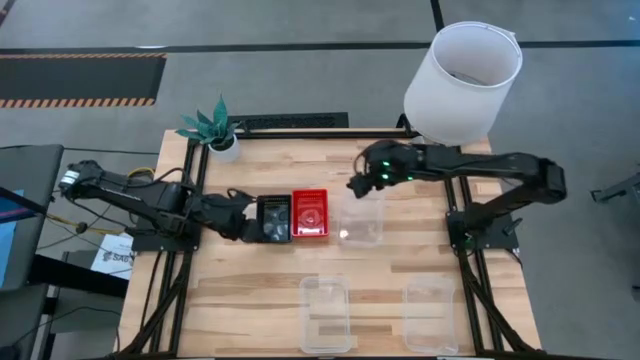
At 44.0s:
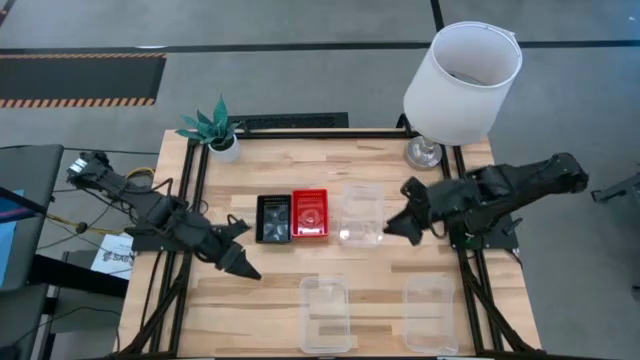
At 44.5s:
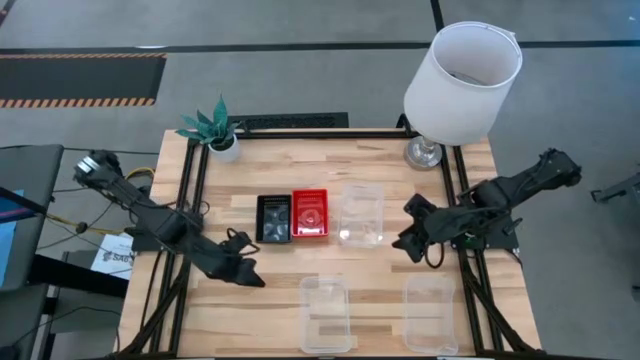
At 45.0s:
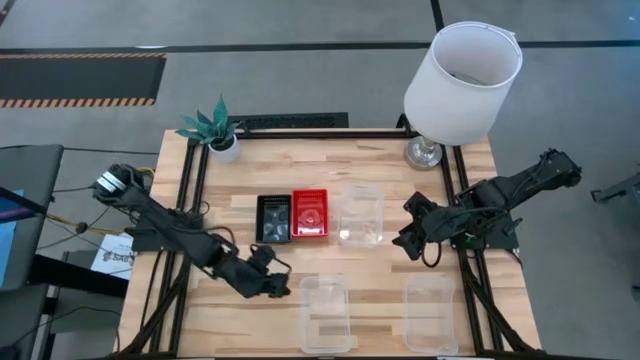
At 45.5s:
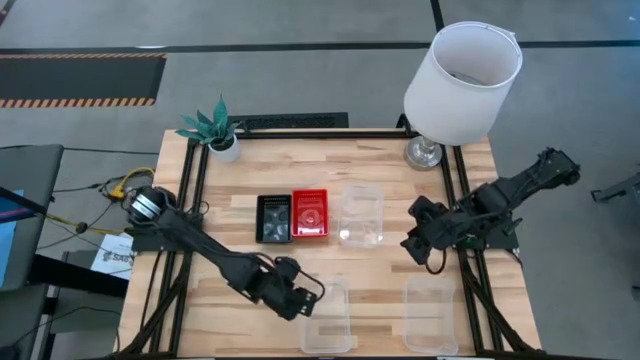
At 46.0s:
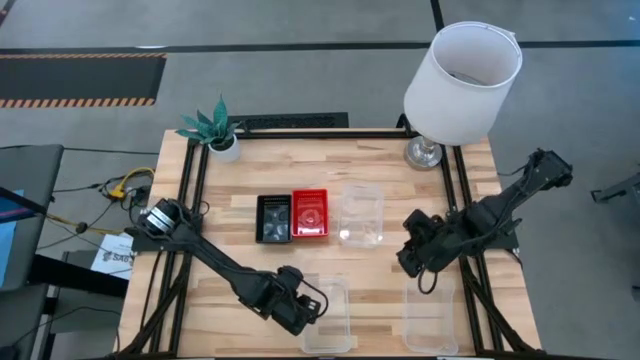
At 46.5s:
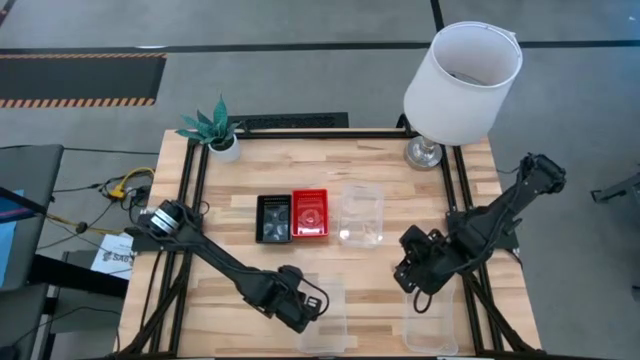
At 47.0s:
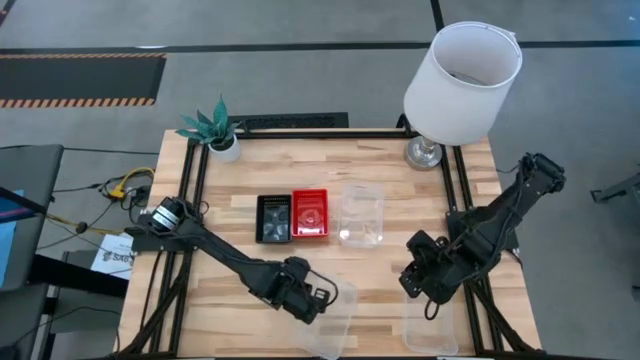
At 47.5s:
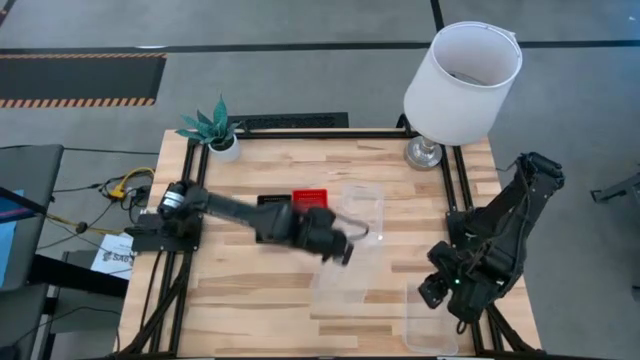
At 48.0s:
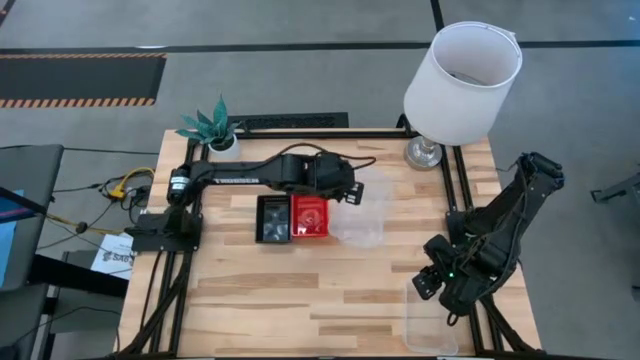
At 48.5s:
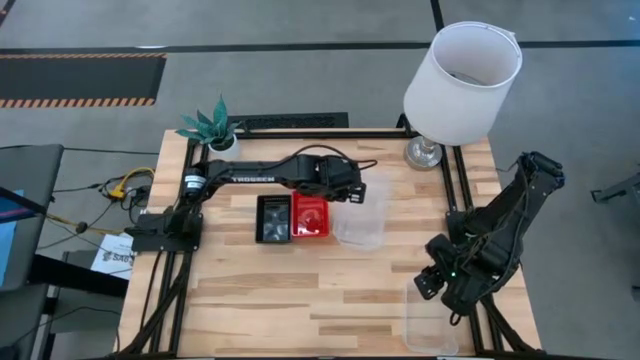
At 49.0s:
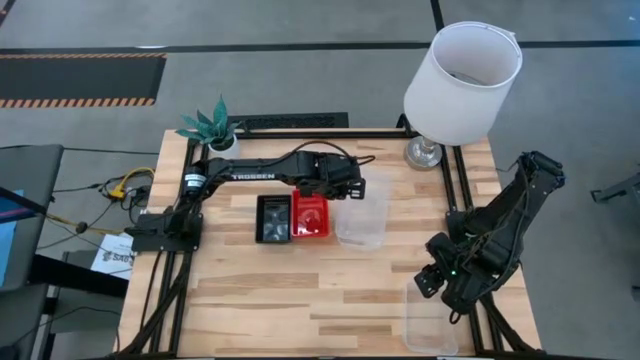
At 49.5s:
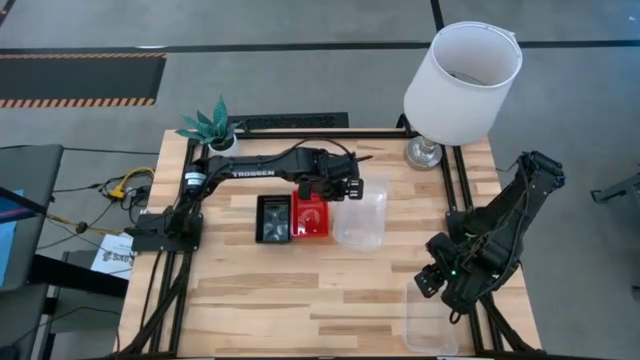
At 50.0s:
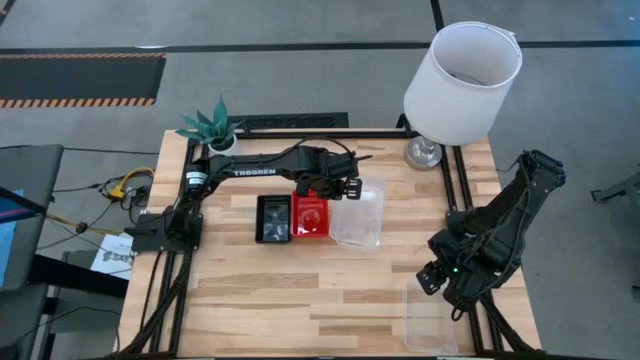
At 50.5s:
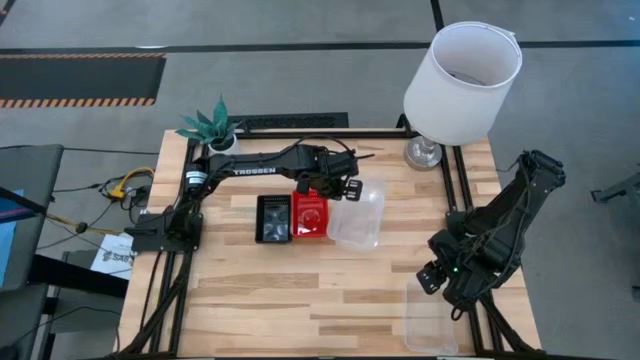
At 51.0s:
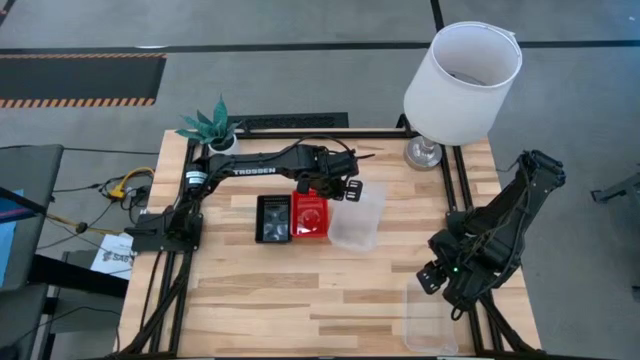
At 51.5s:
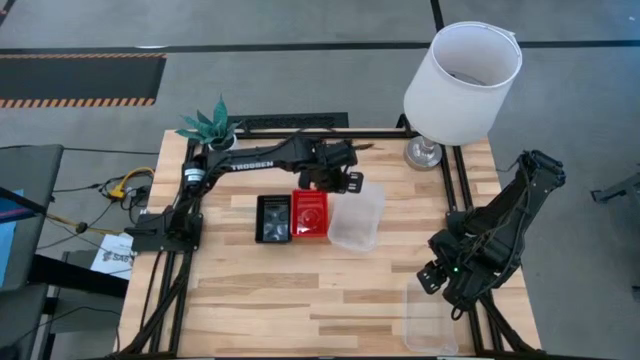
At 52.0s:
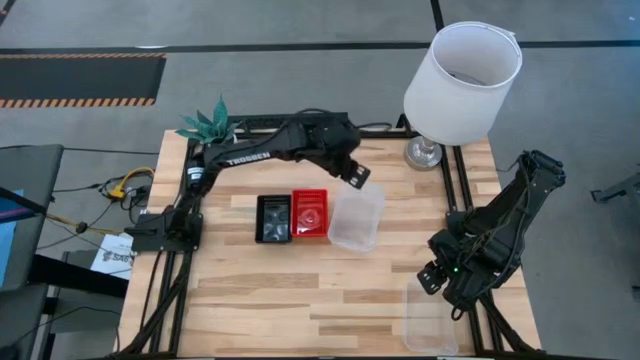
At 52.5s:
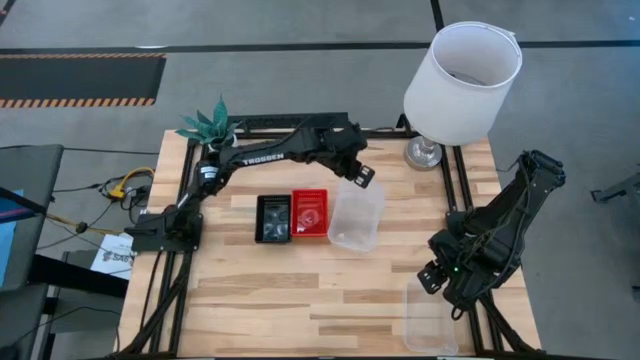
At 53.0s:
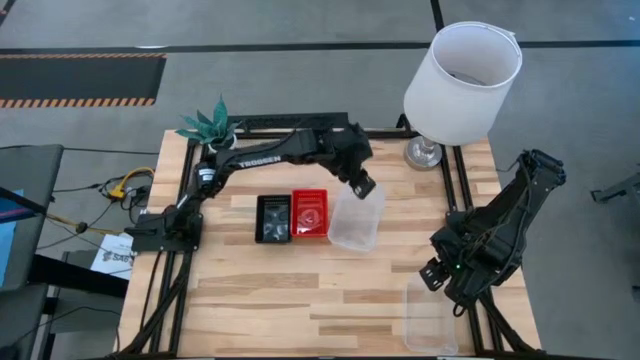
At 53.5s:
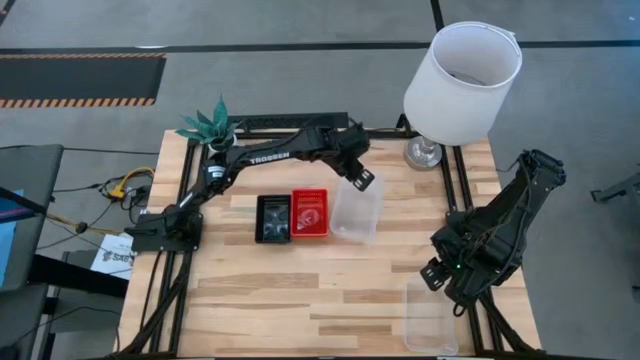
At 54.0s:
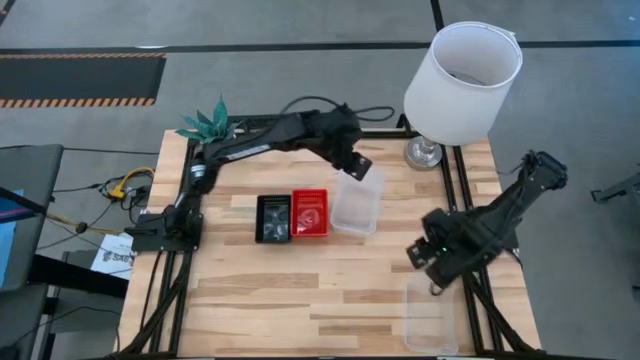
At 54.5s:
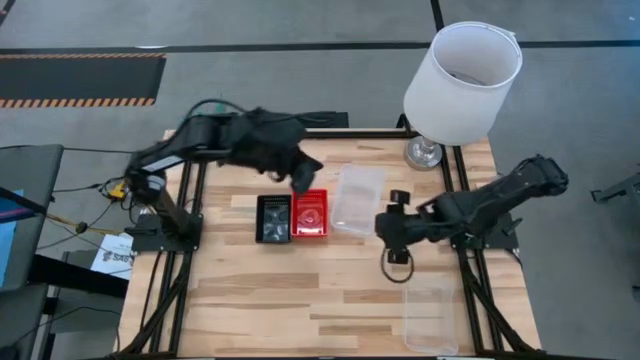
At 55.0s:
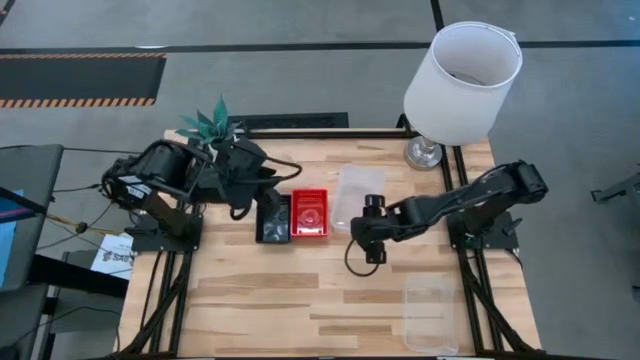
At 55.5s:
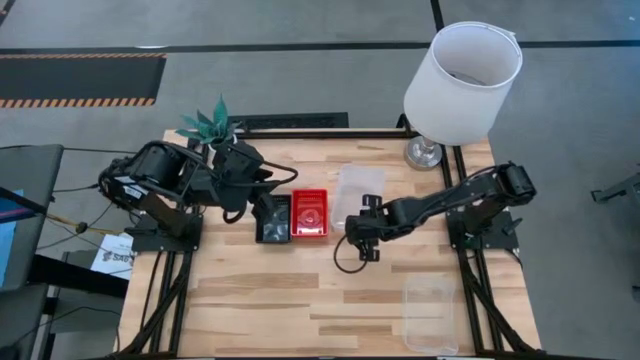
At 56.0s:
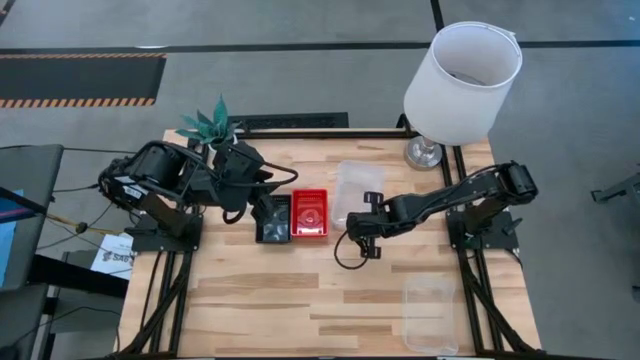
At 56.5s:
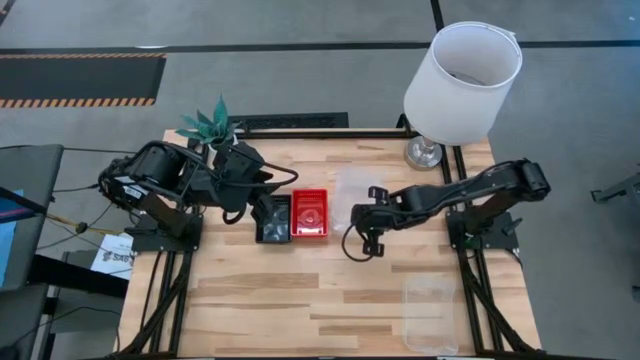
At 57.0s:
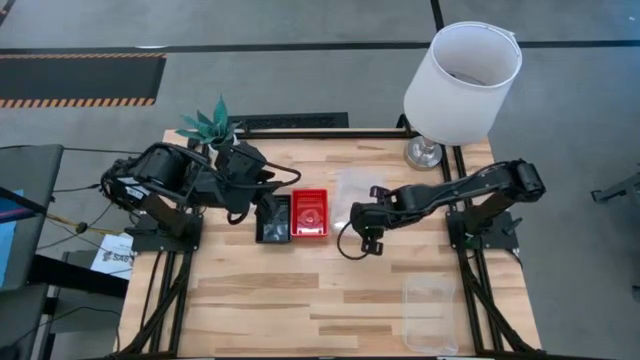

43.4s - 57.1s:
Stack the left transparent bin on top of the top transparent bin

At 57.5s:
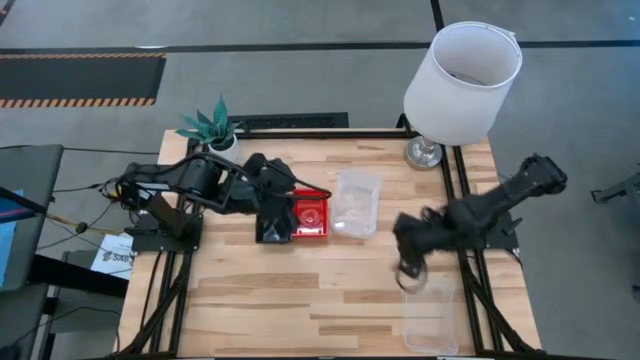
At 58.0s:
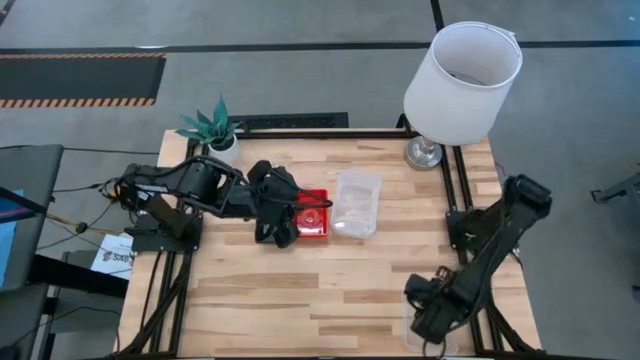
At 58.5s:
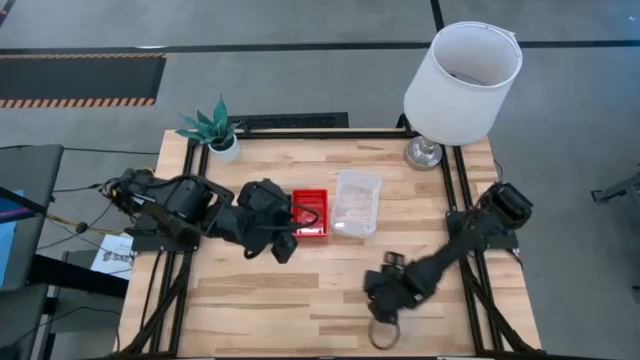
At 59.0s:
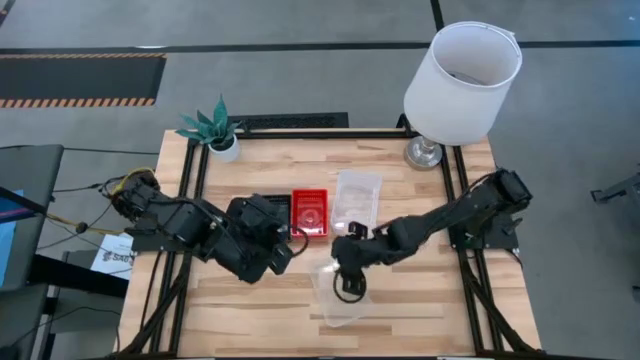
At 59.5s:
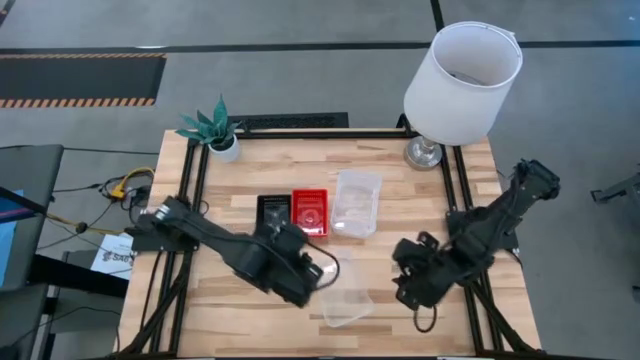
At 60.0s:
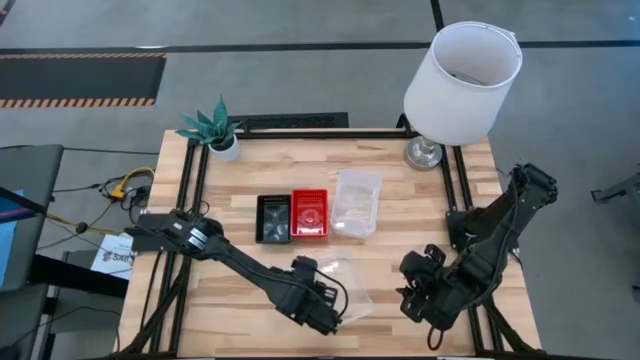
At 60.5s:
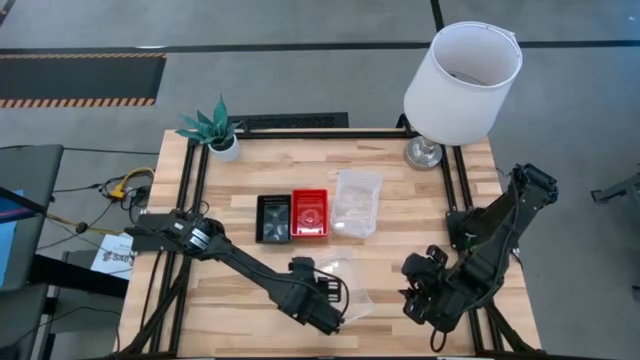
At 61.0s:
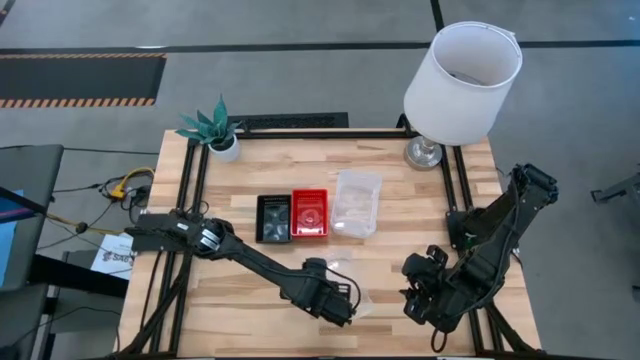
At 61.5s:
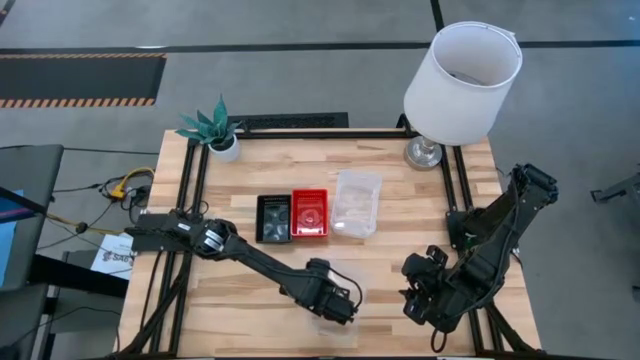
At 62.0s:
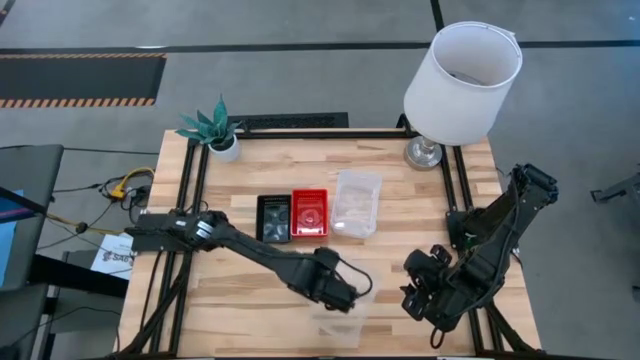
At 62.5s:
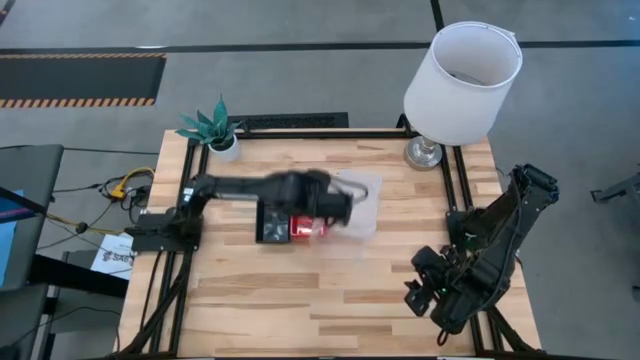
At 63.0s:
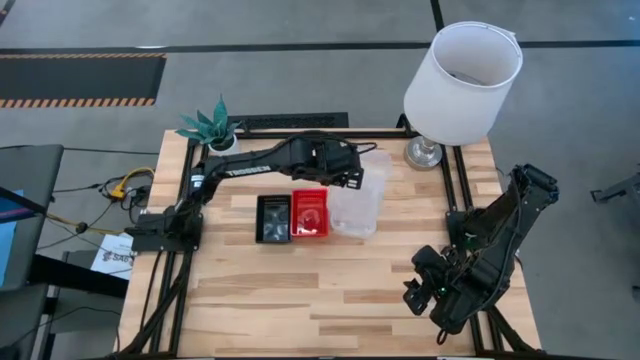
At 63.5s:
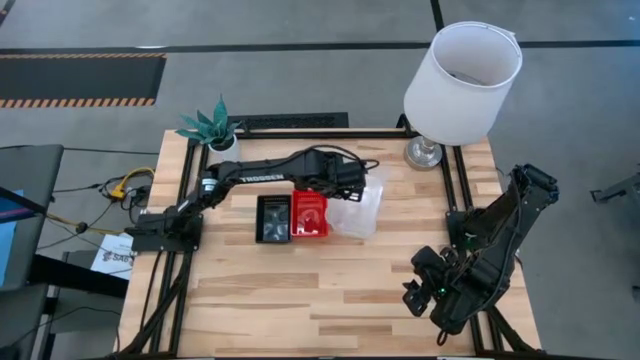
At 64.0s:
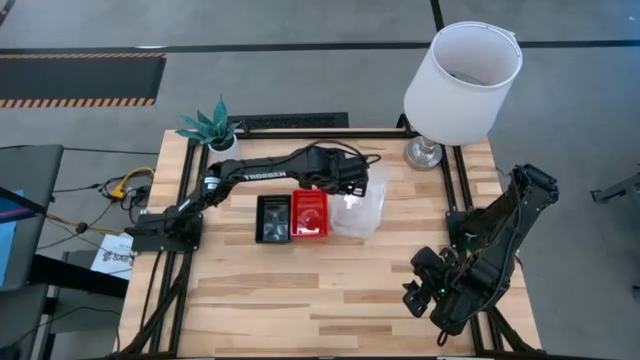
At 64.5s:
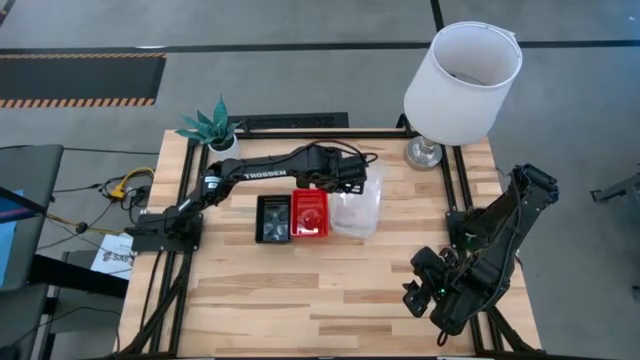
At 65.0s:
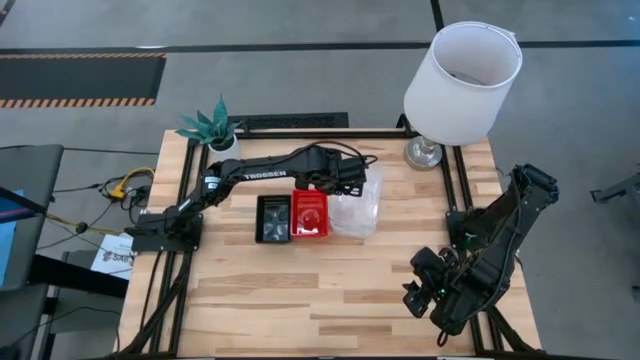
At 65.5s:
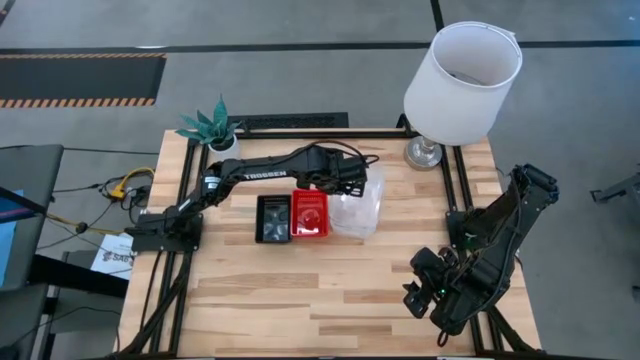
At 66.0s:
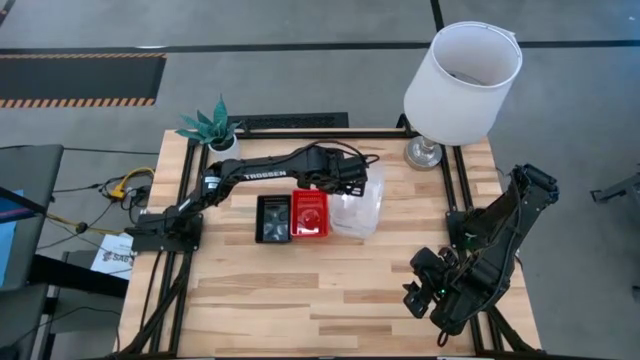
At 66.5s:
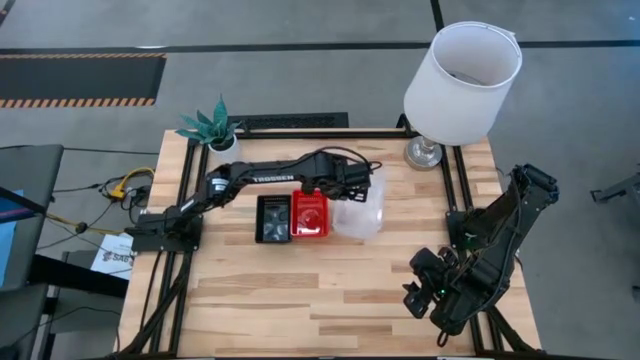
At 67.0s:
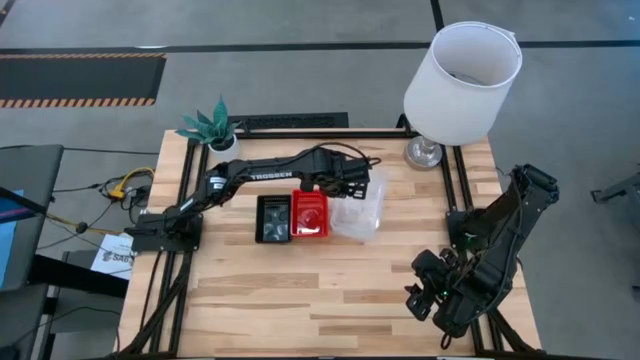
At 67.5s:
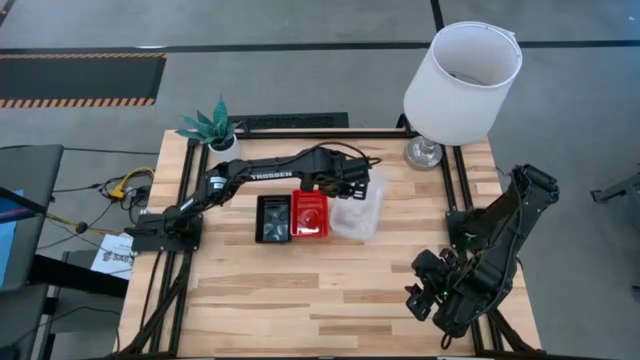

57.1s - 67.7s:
Stack the transparent bin on top of the top transparent bin
